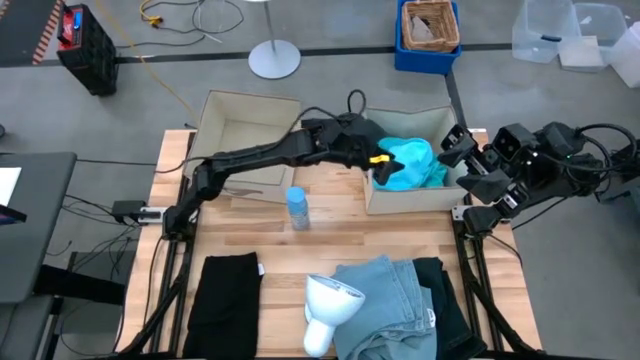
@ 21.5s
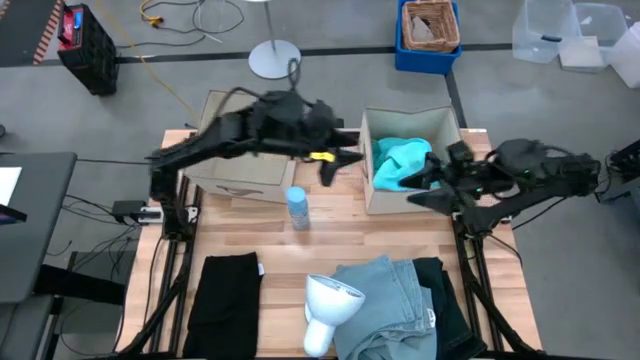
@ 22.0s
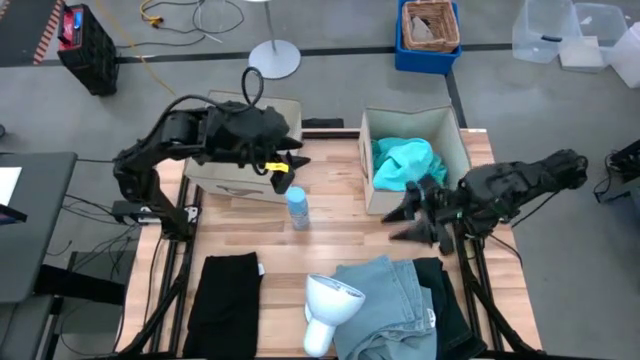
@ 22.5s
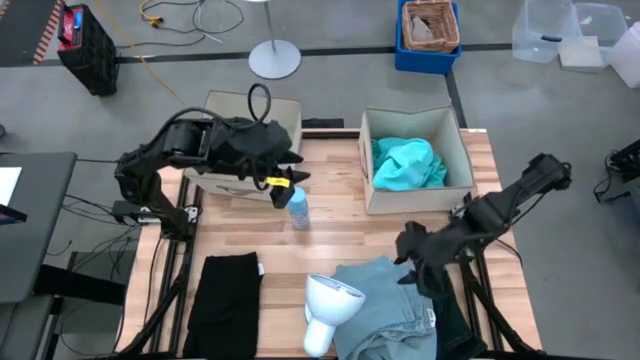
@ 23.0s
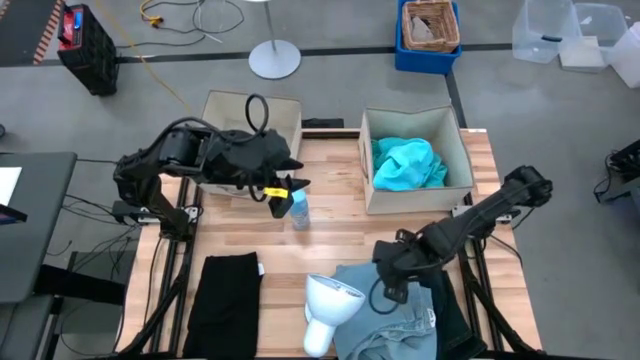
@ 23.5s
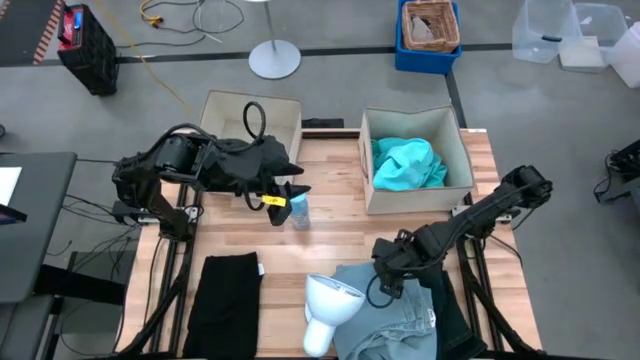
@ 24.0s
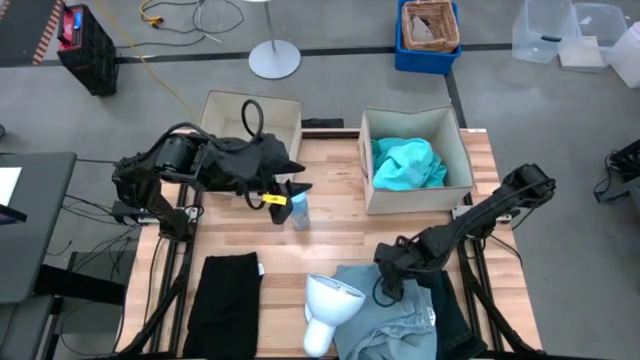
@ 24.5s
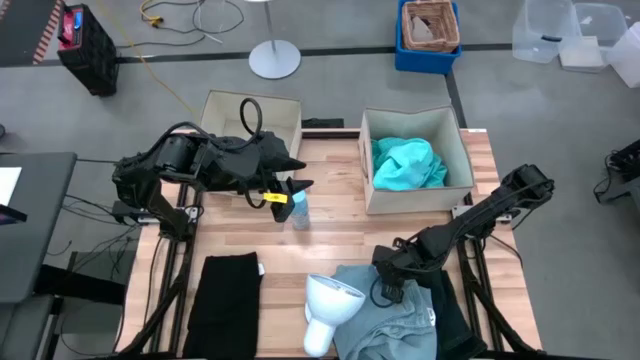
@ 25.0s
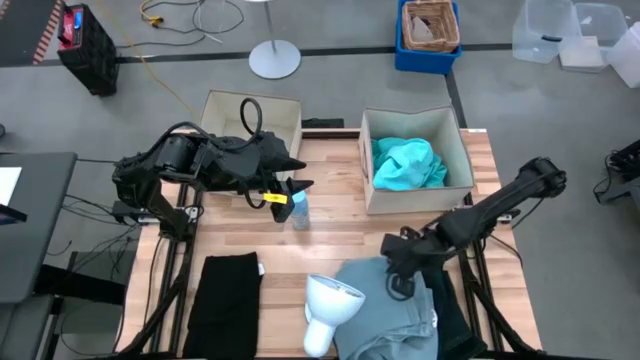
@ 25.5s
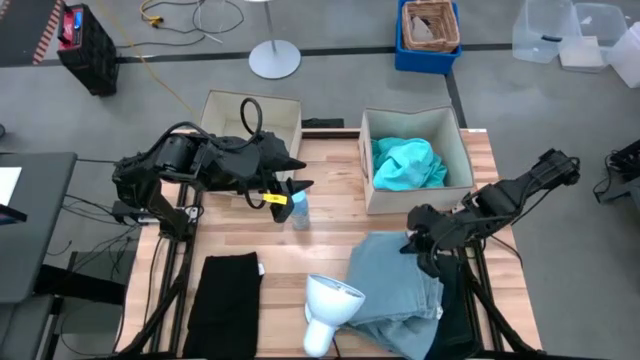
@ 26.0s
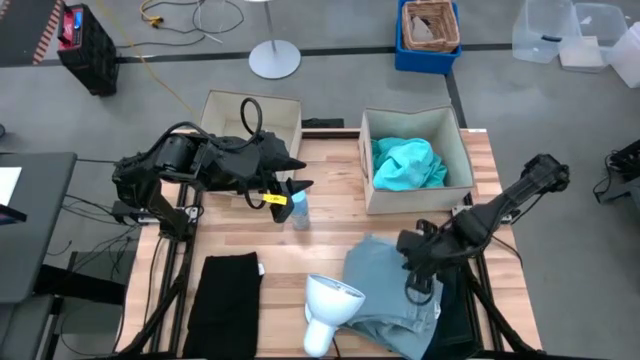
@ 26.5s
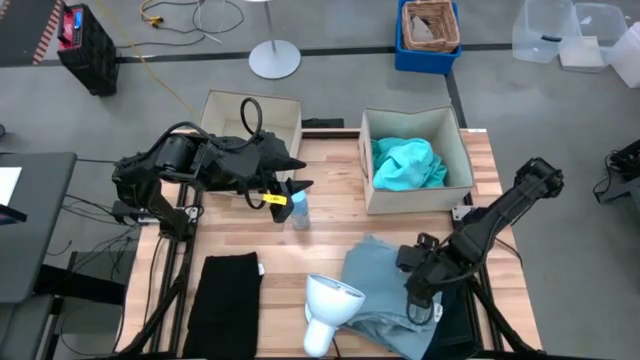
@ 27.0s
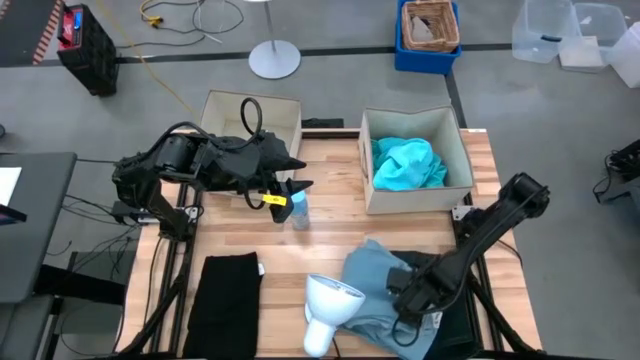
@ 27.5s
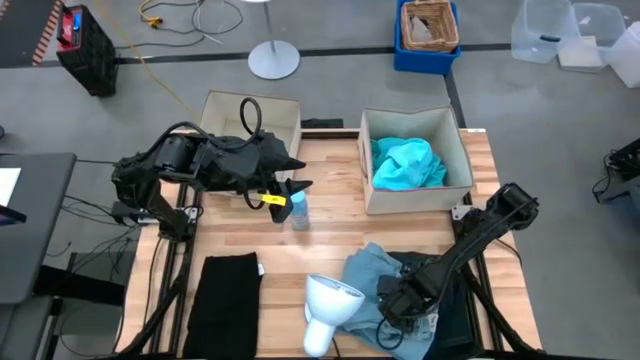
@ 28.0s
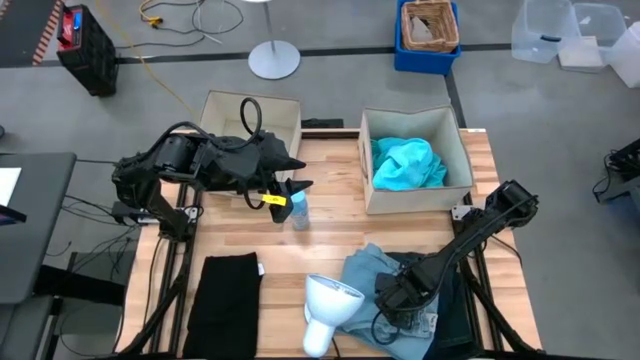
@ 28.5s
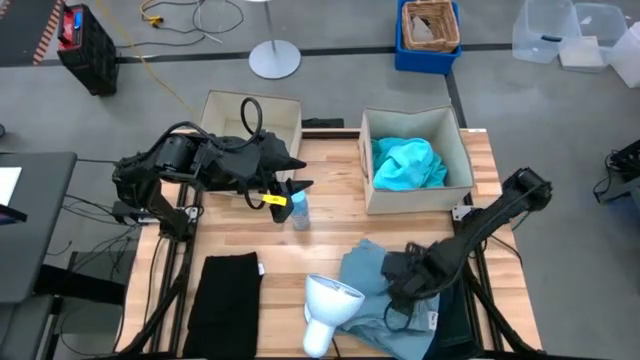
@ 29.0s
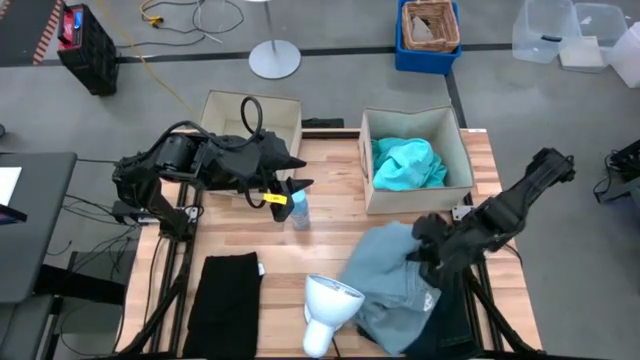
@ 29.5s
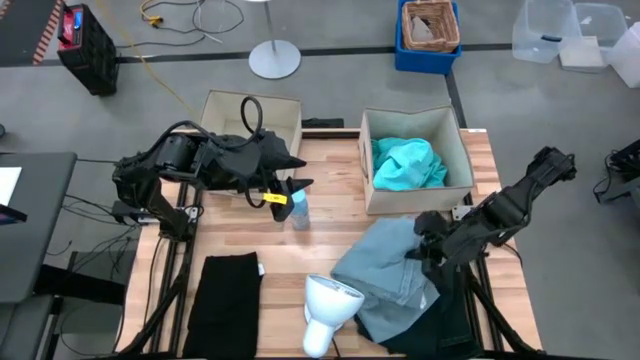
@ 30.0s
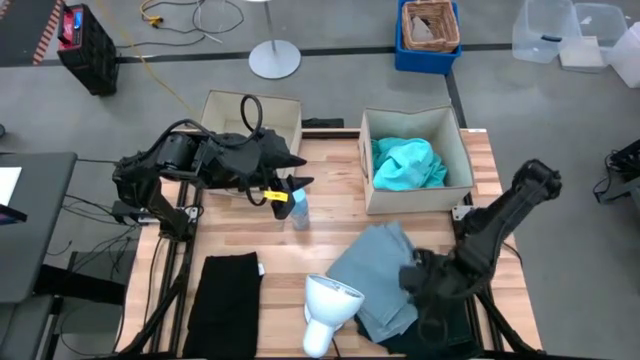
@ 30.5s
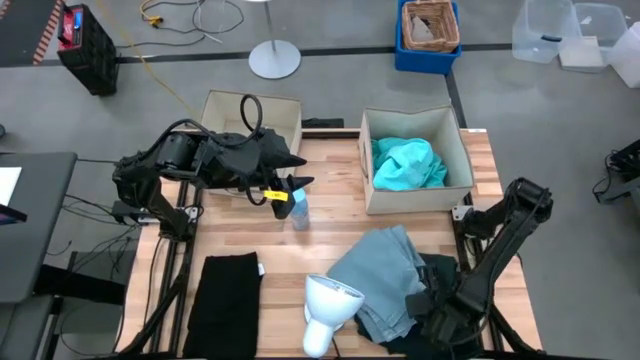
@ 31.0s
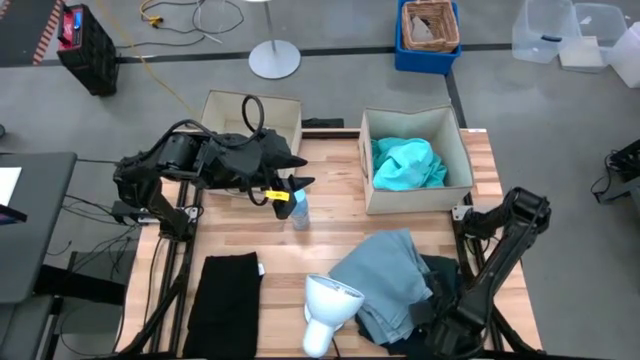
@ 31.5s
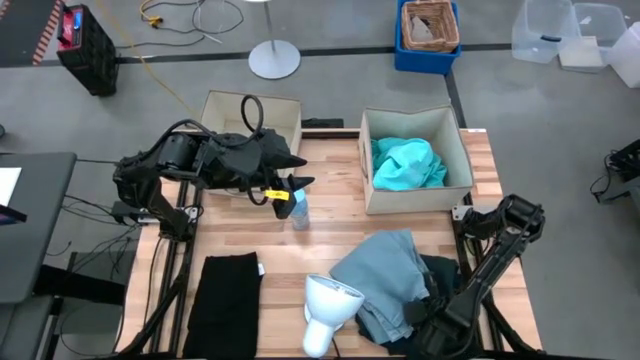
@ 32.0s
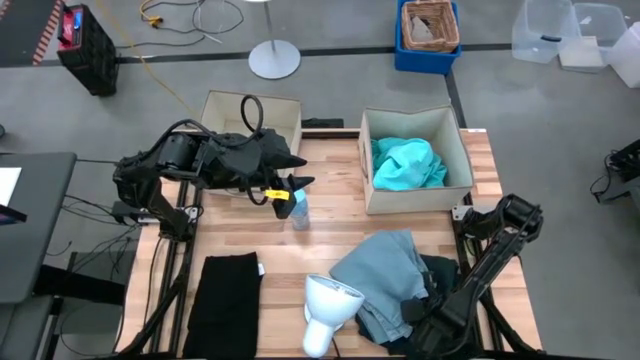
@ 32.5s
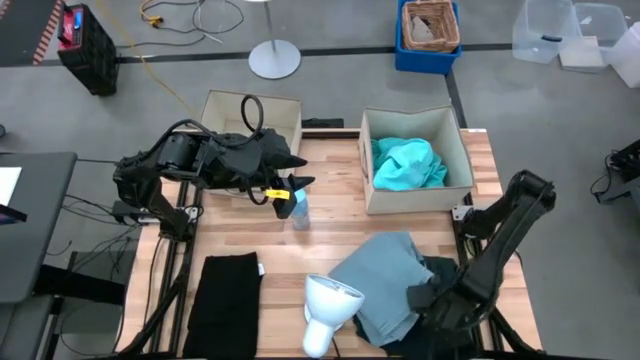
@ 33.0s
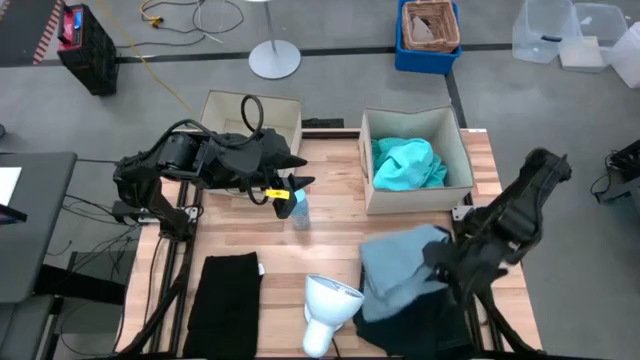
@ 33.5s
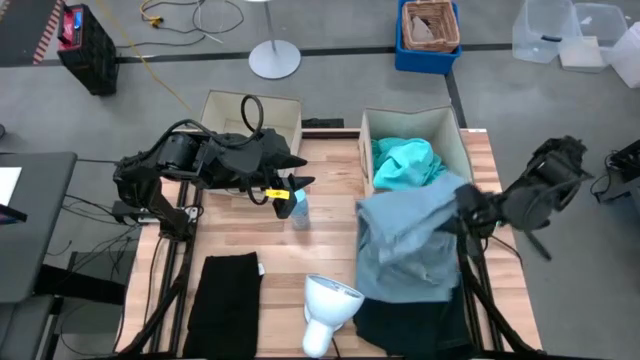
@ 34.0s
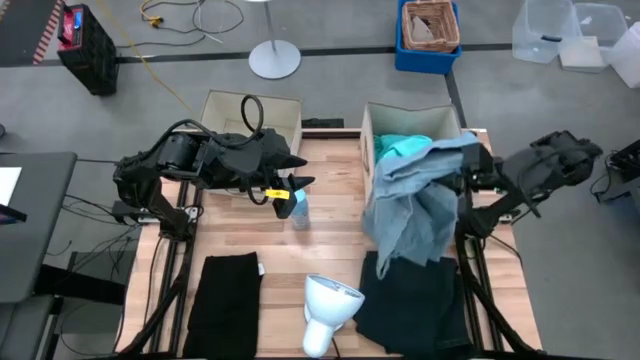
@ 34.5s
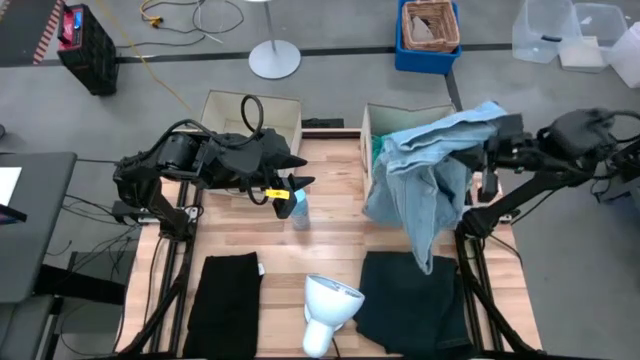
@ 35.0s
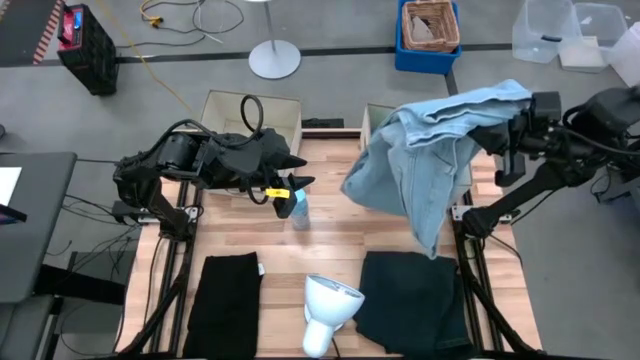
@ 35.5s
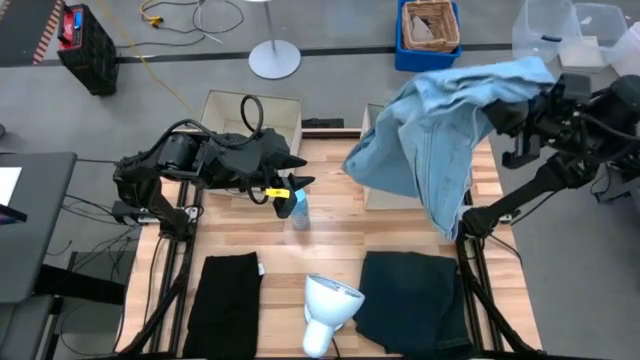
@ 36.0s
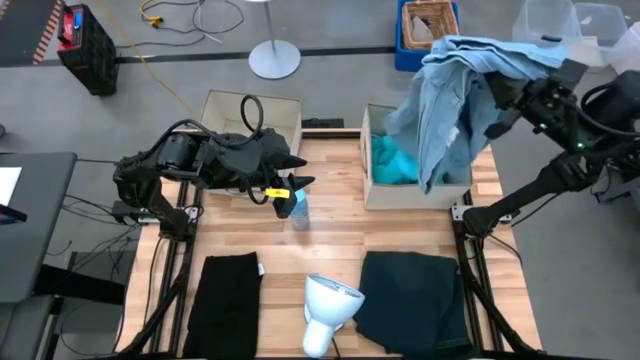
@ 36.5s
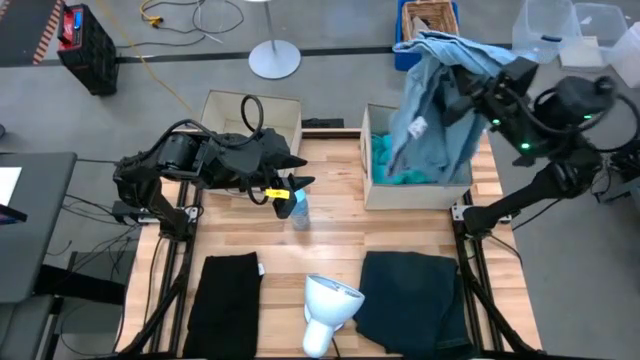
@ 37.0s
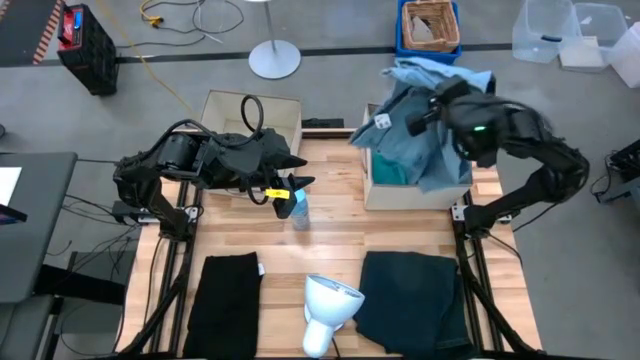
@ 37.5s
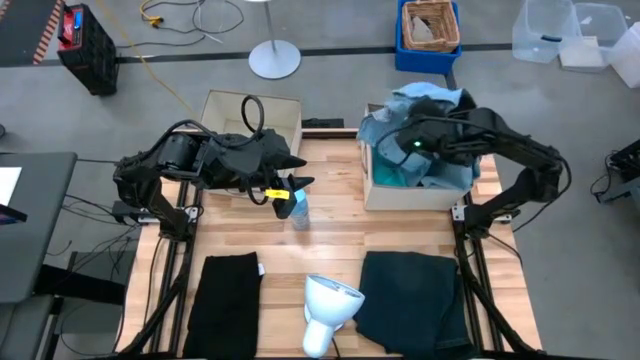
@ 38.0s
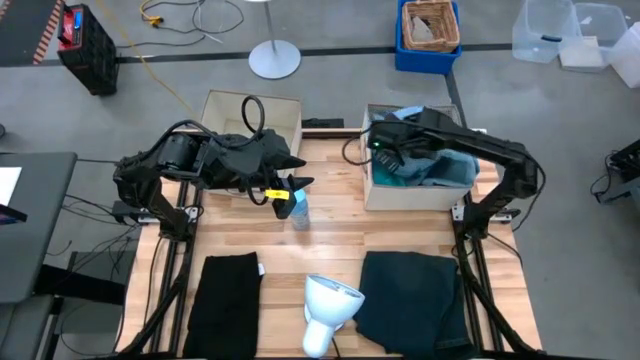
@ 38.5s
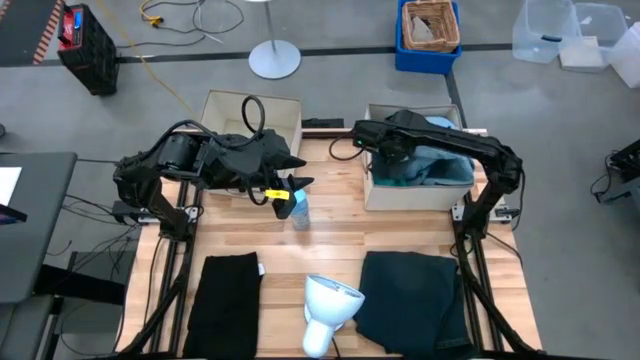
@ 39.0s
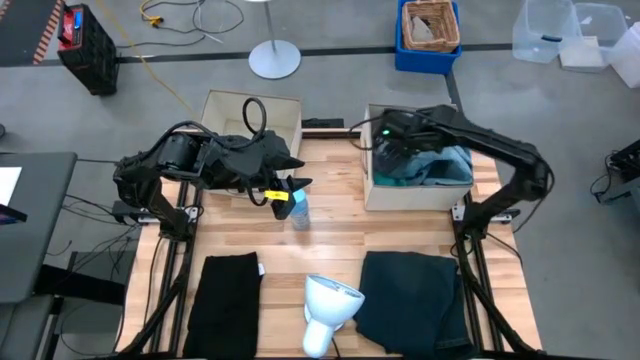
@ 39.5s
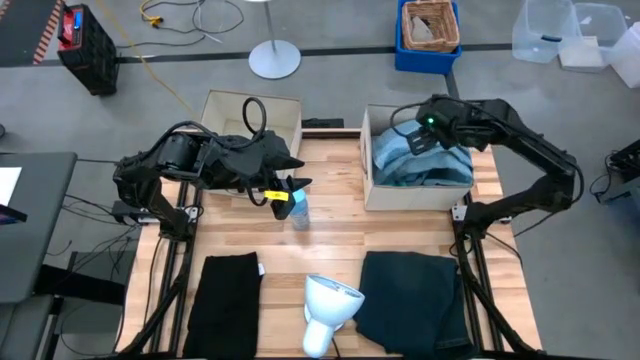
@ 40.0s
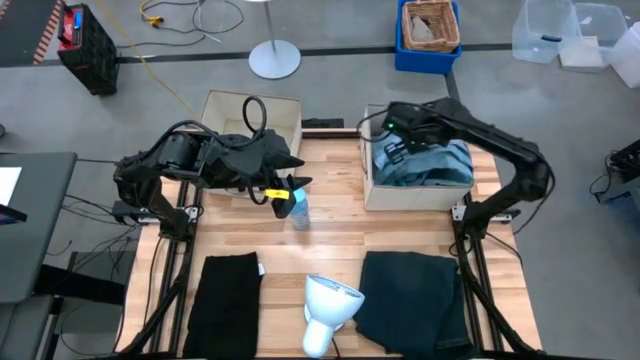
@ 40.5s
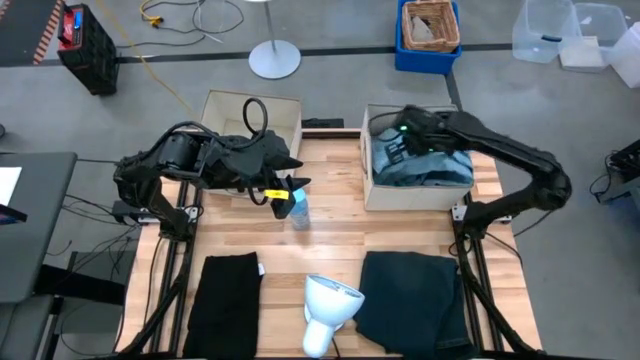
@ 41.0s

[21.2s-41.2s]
Task: Sort clothes
Put the blue pants into the right laundry organizer
